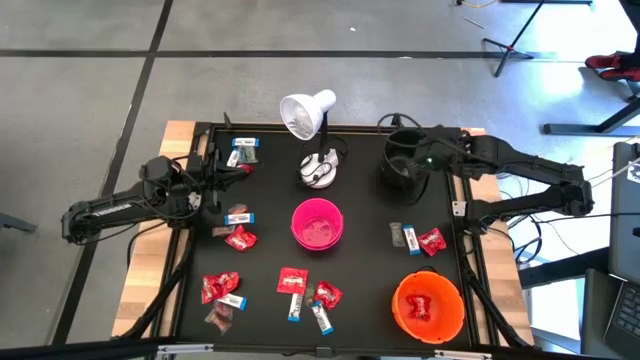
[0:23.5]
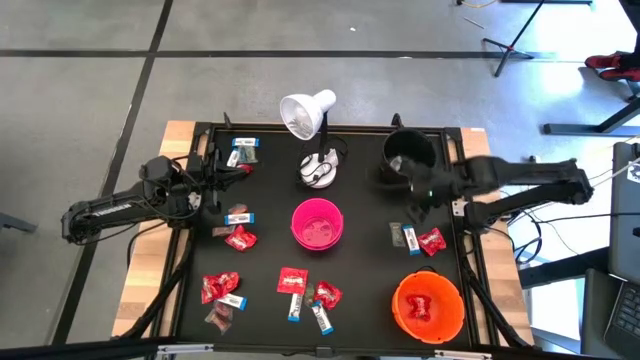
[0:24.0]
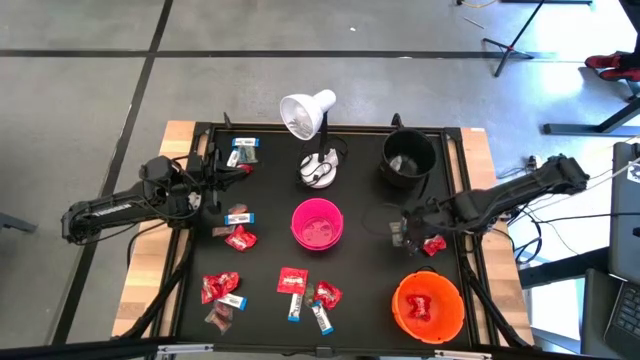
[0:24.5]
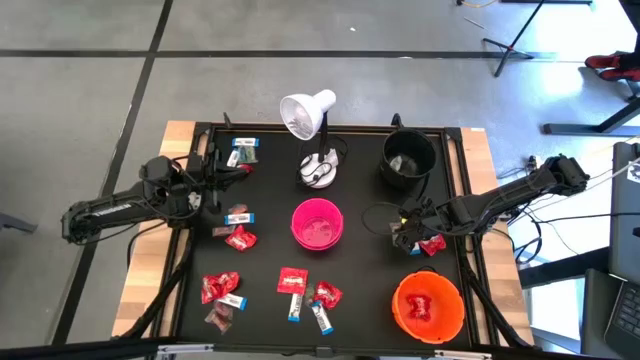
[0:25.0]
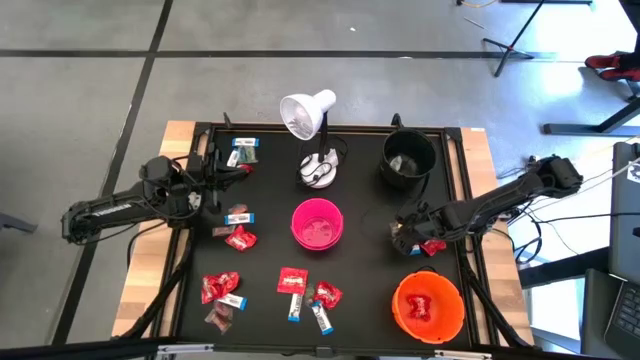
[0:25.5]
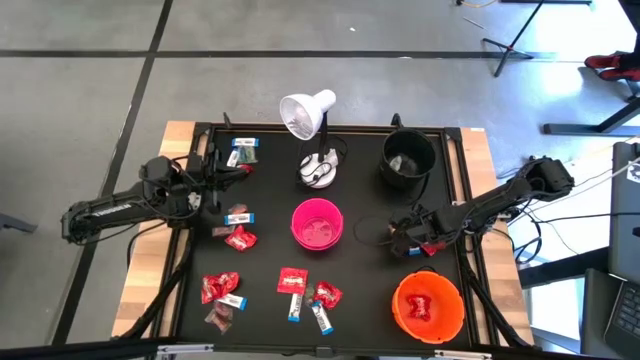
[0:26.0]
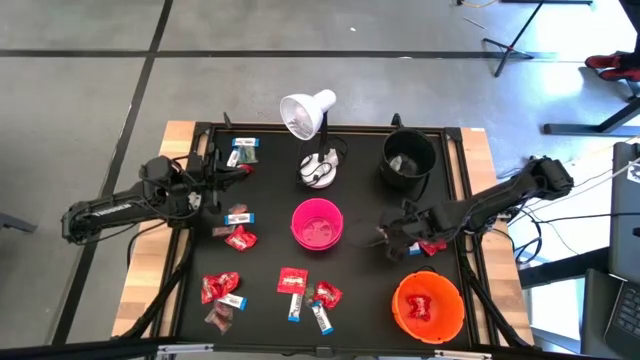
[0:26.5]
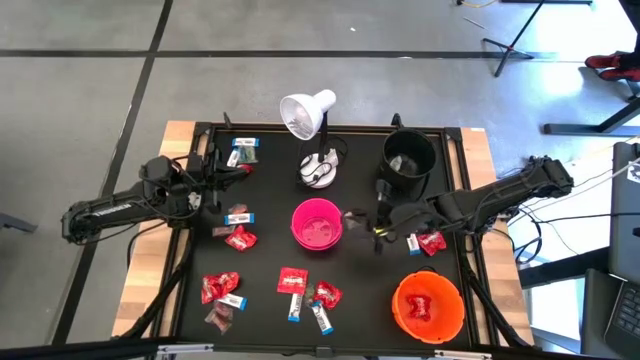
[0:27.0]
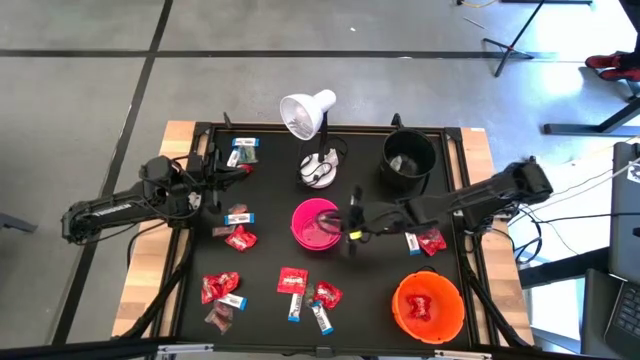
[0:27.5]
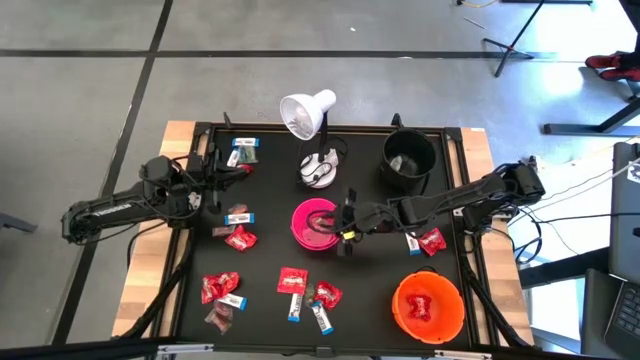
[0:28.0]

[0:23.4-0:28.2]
Task: Sort candy
Put the green candy into the pink bucket

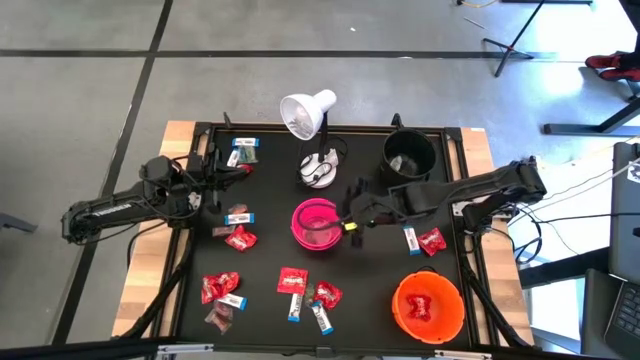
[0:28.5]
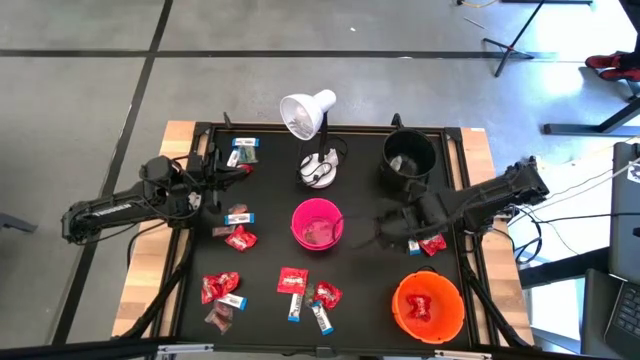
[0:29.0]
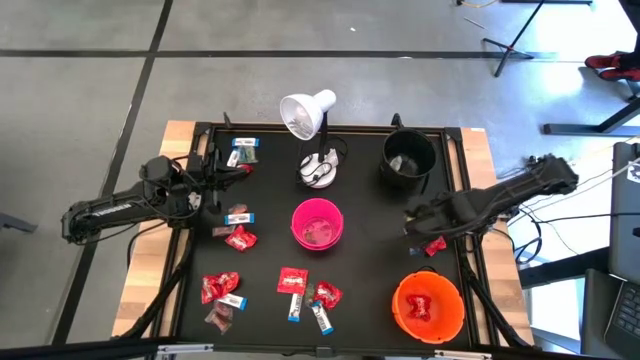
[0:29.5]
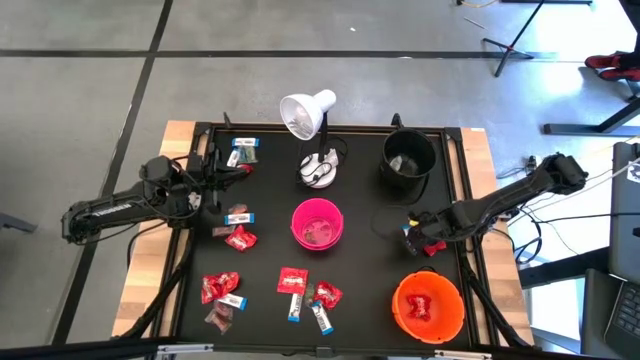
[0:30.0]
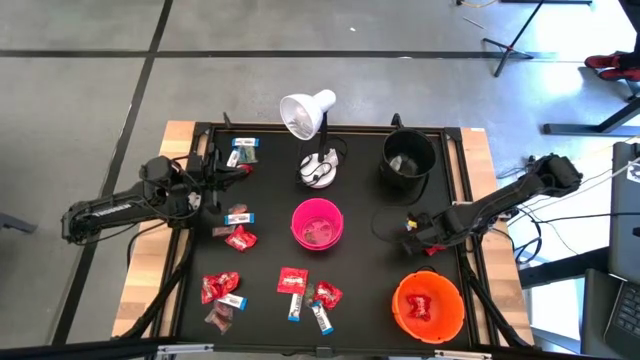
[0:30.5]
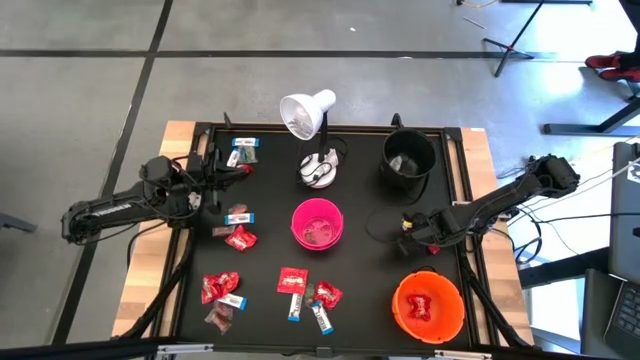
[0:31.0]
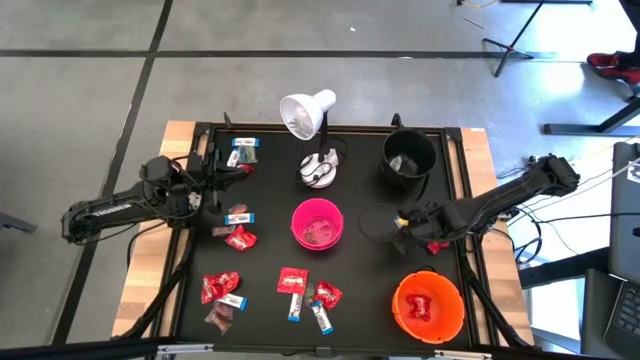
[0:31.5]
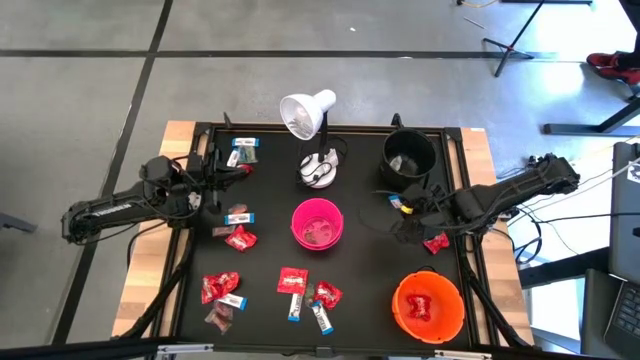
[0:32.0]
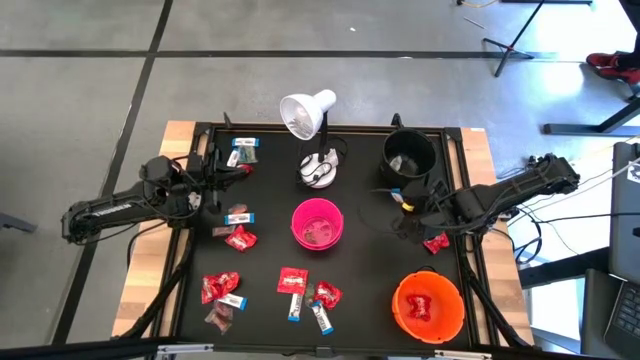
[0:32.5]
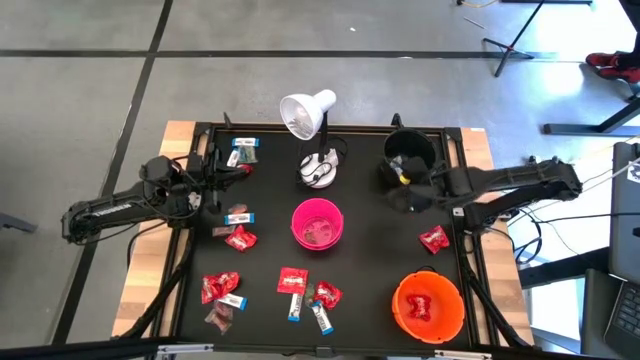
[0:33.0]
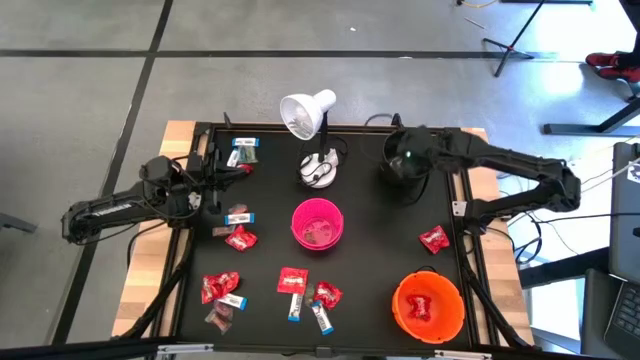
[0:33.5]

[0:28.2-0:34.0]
Put the white chocolate bar into the black bucket

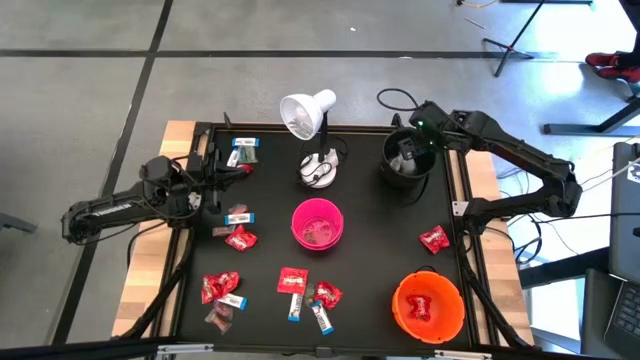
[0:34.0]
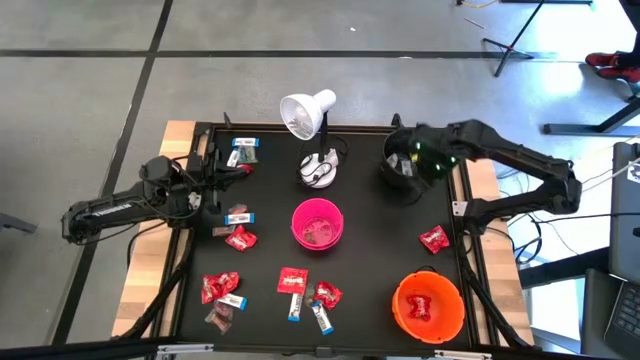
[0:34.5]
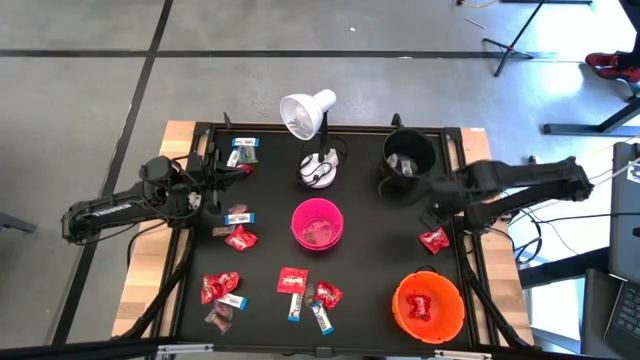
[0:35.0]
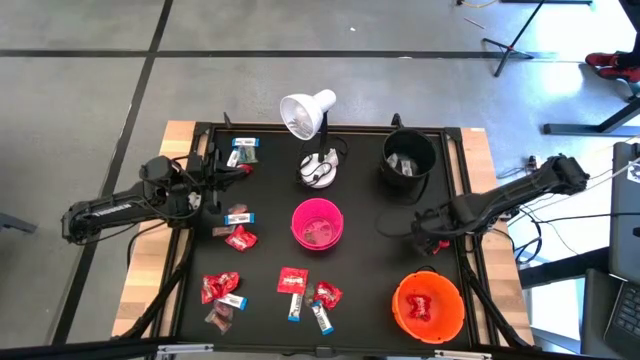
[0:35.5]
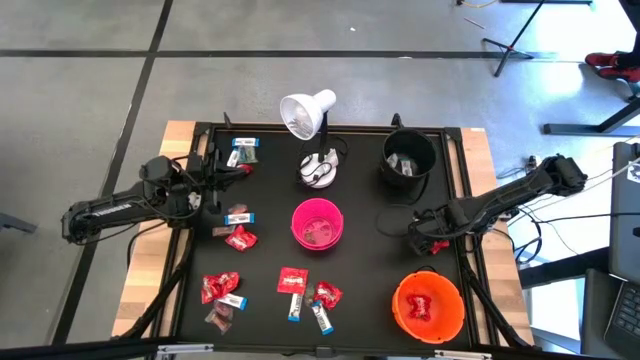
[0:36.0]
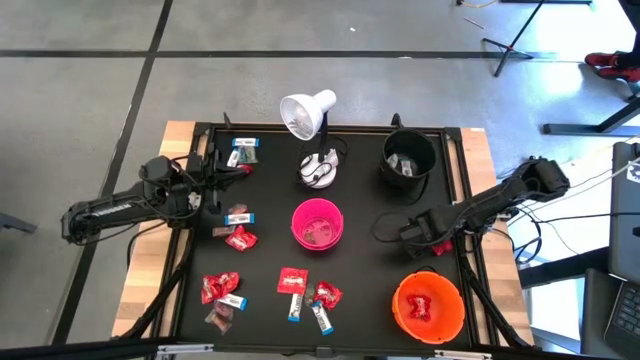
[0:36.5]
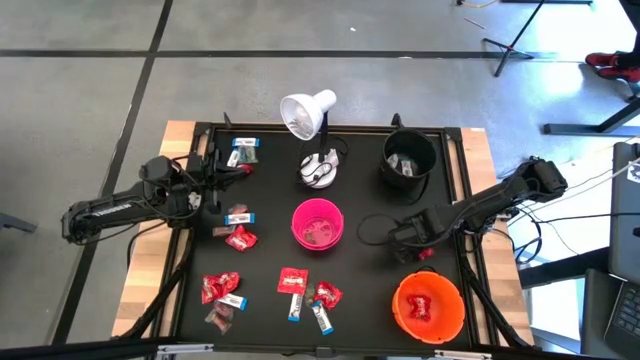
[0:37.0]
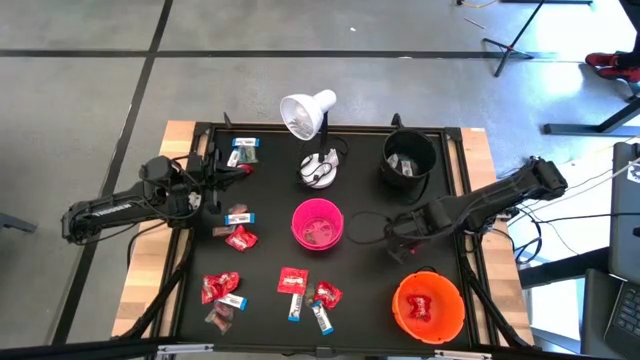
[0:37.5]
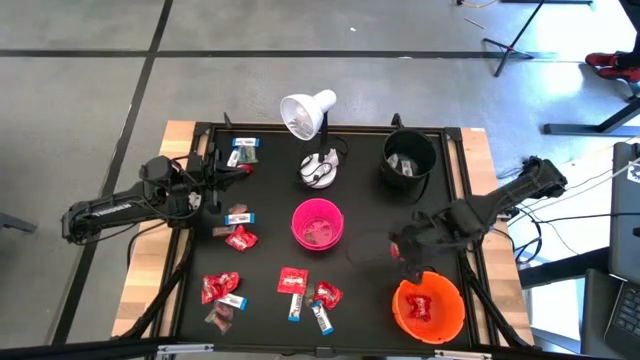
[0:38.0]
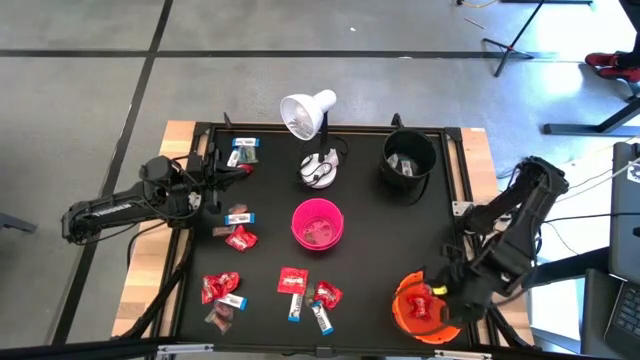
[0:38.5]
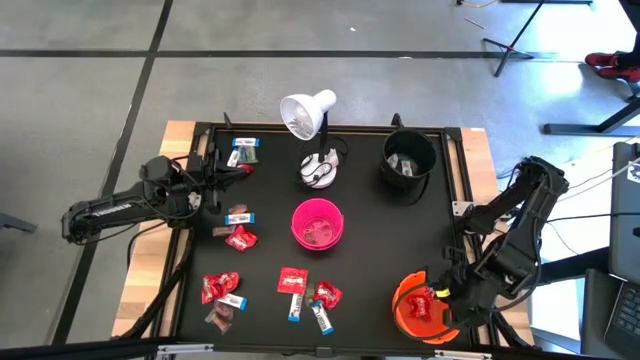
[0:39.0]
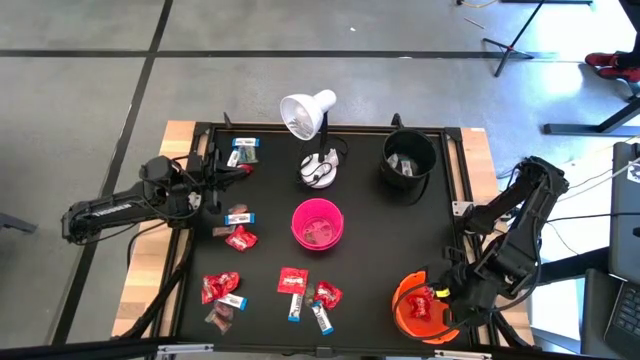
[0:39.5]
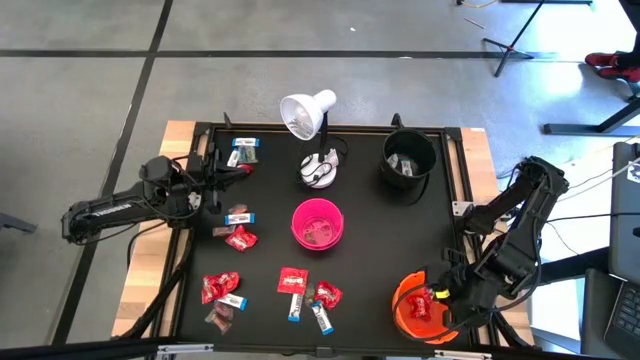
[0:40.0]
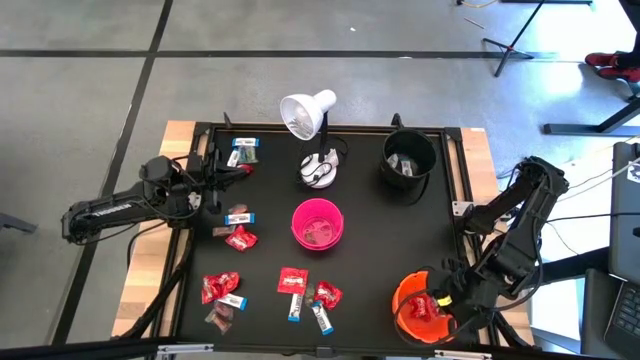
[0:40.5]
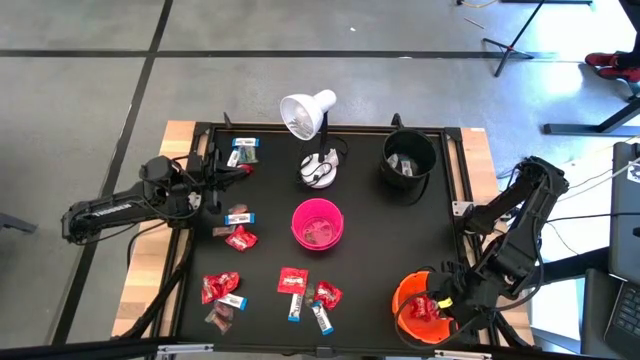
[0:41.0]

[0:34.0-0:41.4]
Put the red candy into the orange bucket

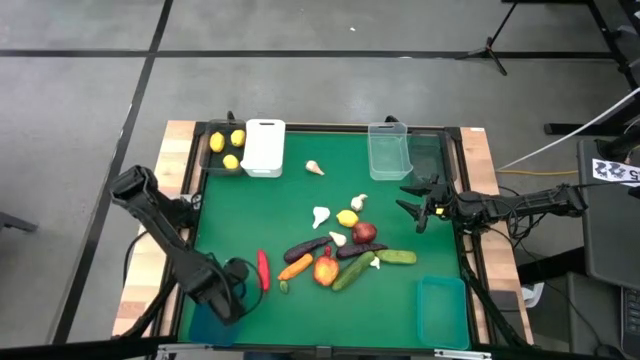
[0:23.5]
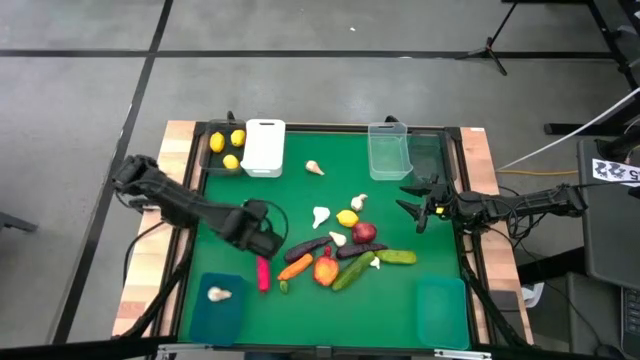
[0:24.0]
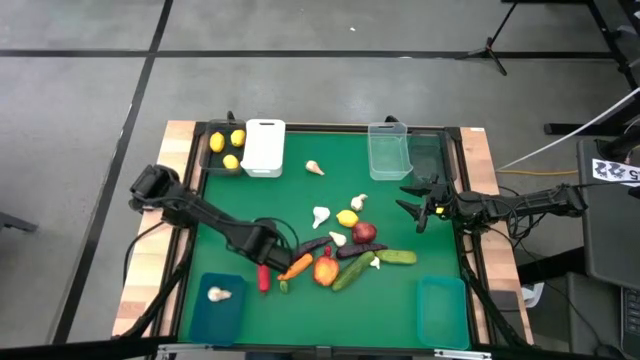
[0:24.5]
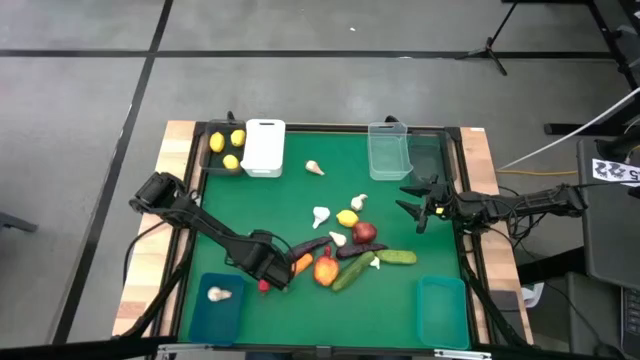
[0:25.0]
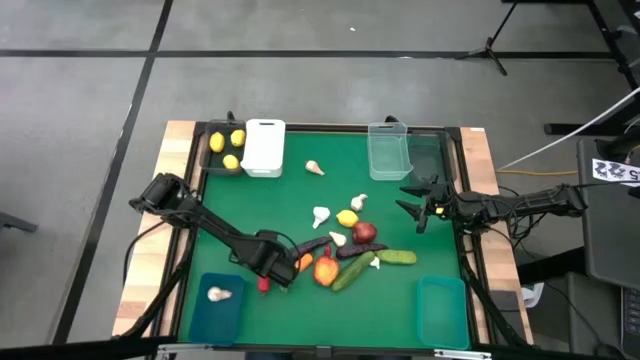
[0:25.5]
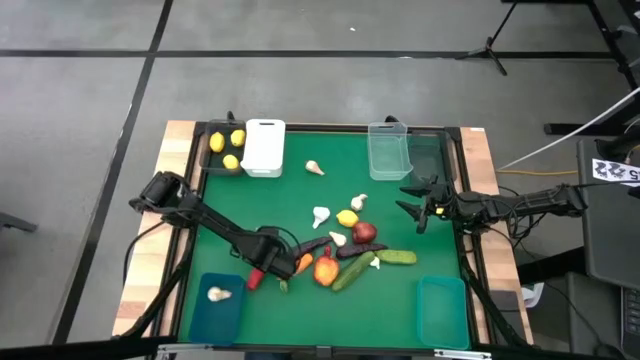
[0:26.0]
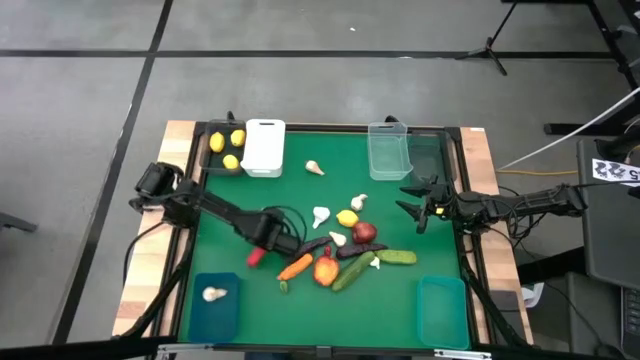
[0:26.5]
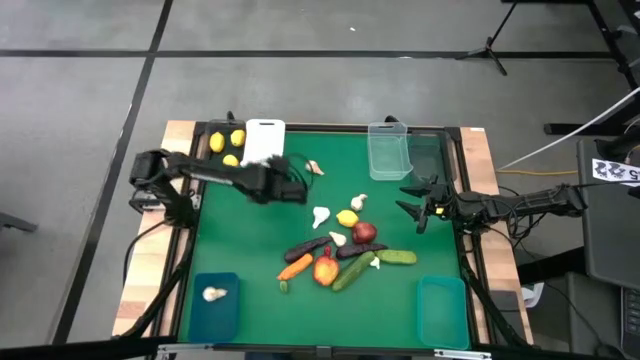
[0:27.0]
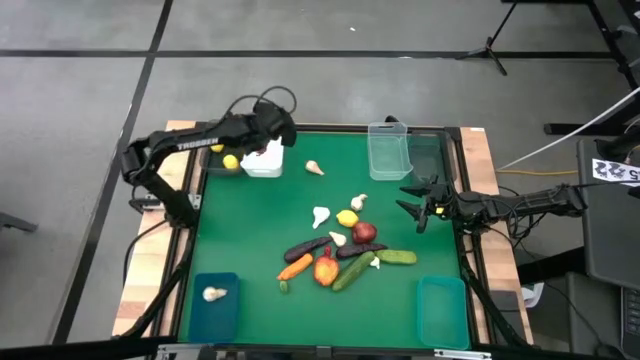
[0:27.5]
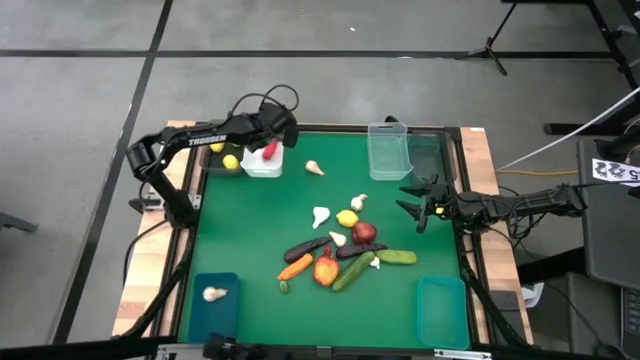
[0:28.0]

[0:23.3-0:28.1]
Task: Sort produce into baskets
Put the red chili pepper into the white bin
